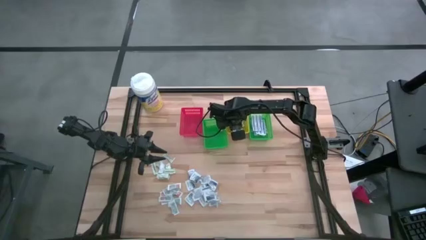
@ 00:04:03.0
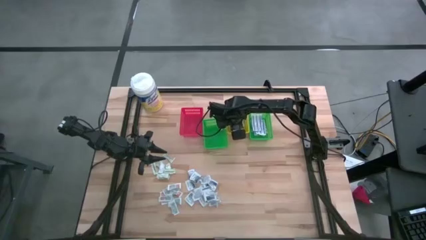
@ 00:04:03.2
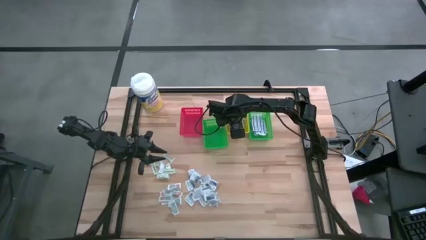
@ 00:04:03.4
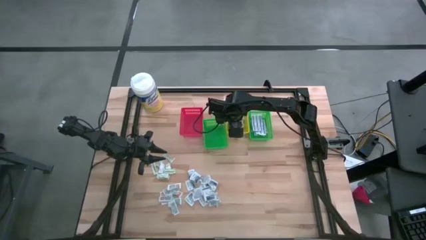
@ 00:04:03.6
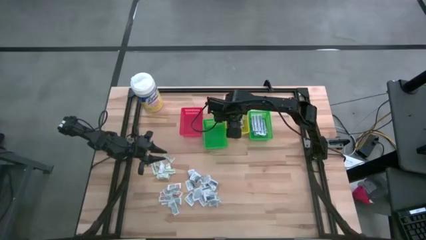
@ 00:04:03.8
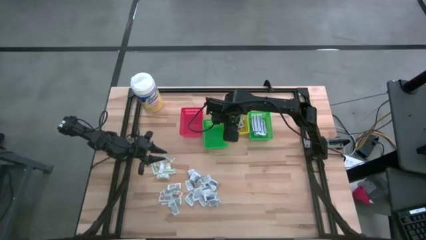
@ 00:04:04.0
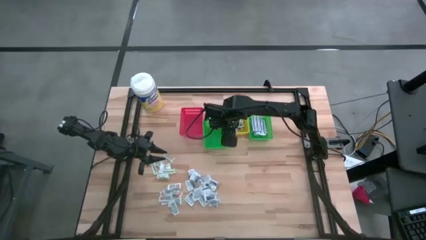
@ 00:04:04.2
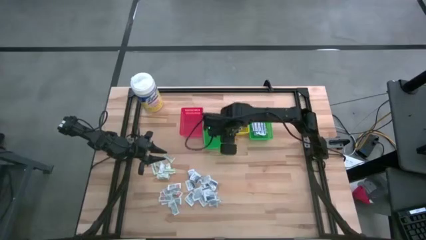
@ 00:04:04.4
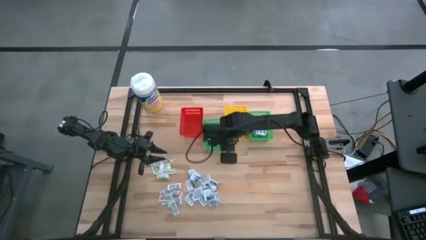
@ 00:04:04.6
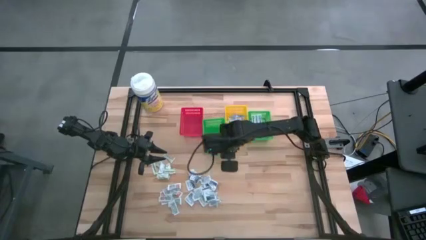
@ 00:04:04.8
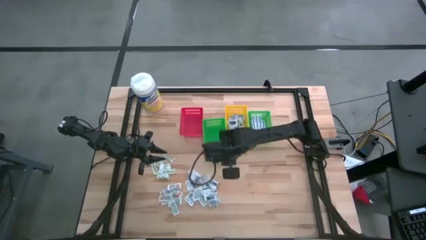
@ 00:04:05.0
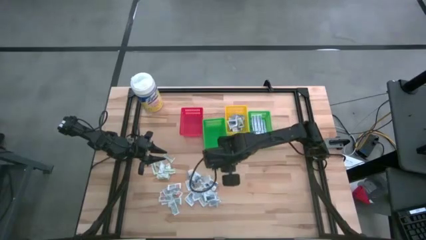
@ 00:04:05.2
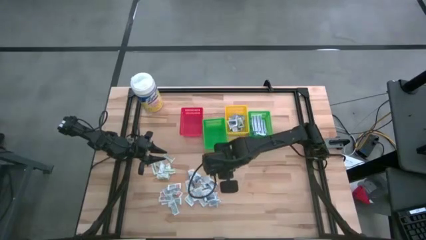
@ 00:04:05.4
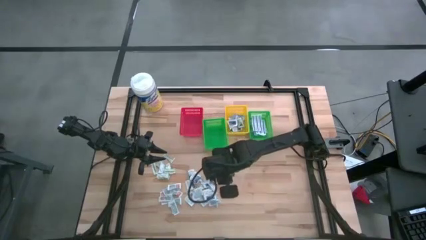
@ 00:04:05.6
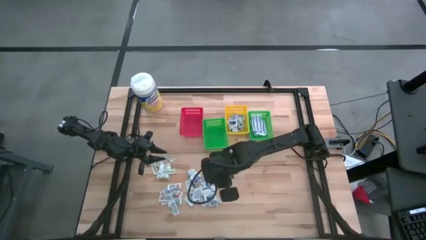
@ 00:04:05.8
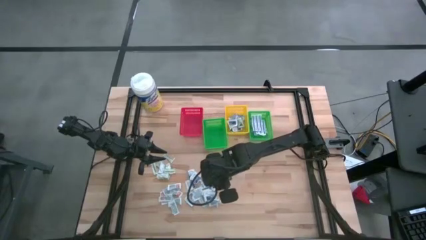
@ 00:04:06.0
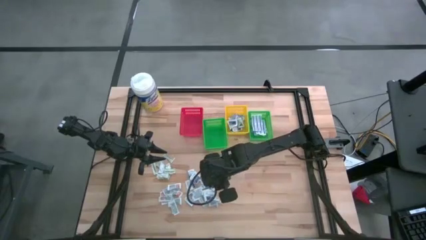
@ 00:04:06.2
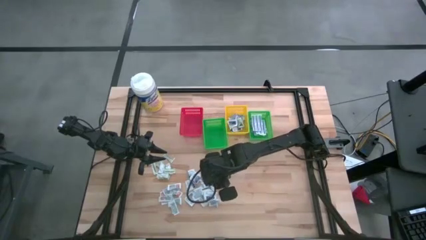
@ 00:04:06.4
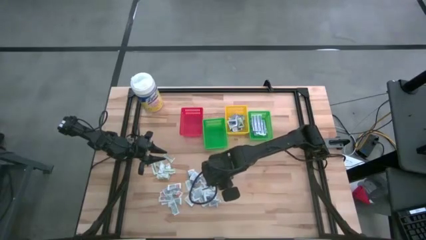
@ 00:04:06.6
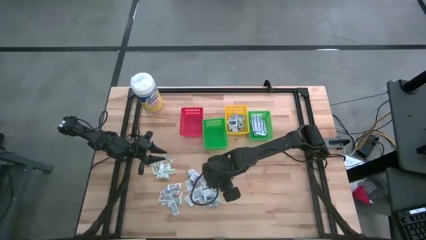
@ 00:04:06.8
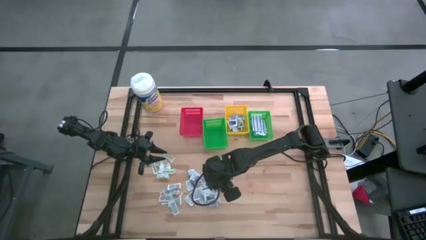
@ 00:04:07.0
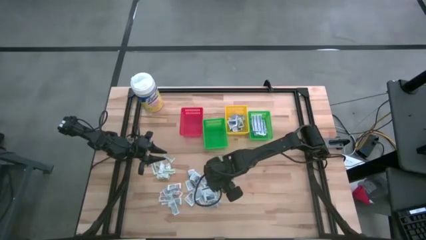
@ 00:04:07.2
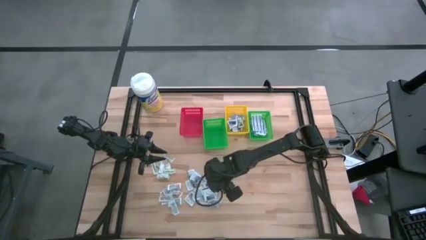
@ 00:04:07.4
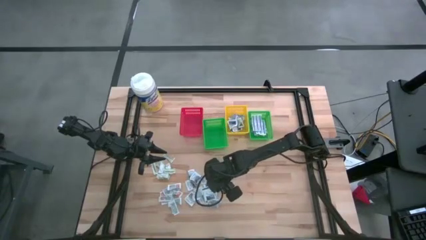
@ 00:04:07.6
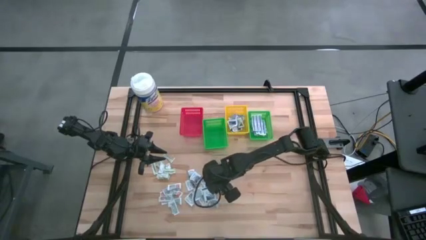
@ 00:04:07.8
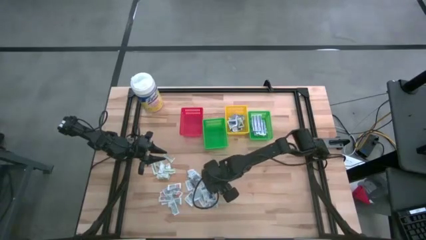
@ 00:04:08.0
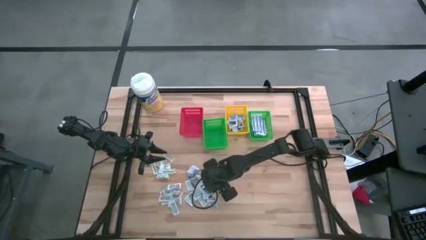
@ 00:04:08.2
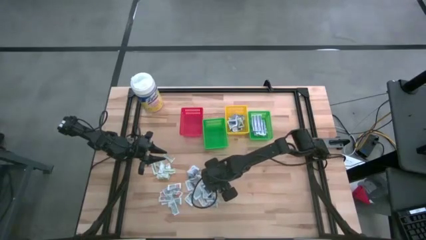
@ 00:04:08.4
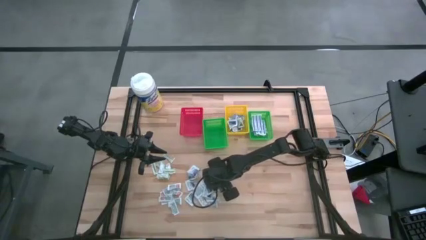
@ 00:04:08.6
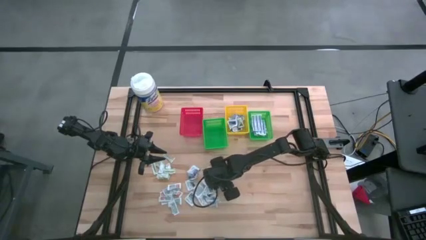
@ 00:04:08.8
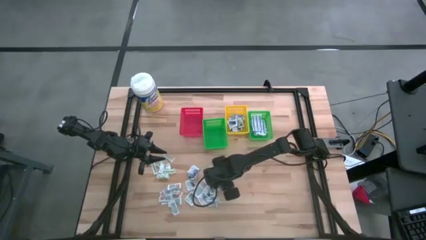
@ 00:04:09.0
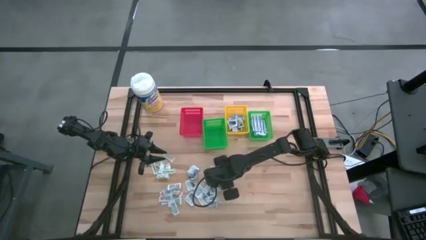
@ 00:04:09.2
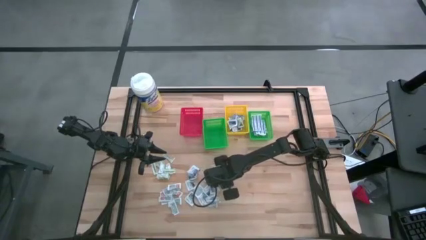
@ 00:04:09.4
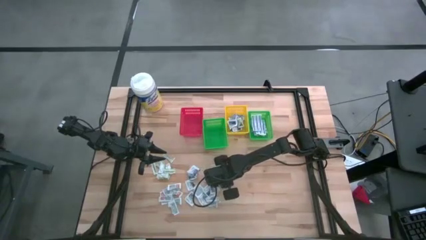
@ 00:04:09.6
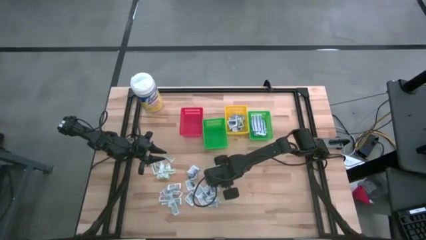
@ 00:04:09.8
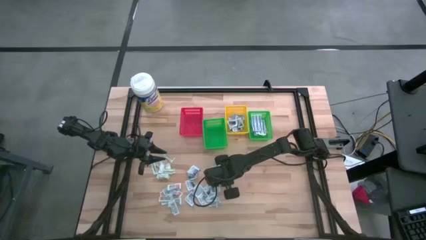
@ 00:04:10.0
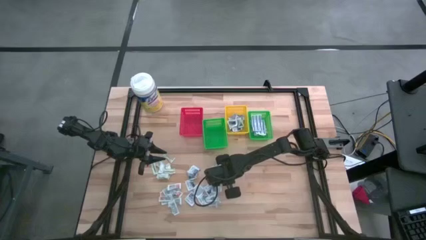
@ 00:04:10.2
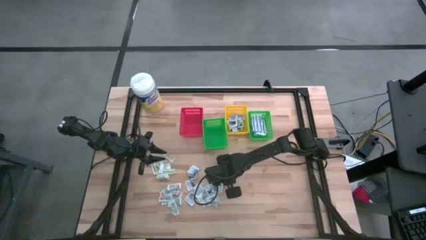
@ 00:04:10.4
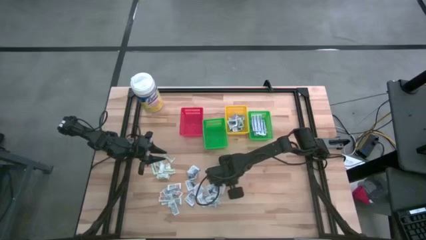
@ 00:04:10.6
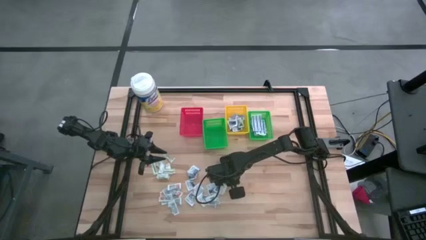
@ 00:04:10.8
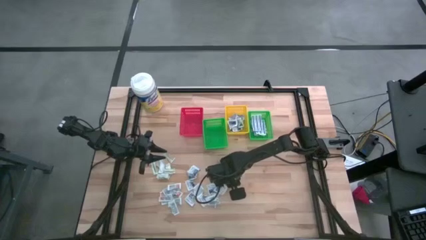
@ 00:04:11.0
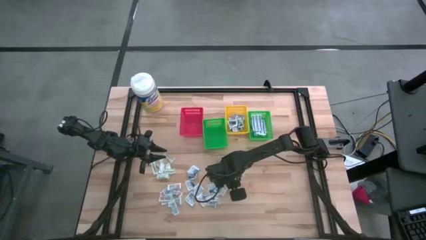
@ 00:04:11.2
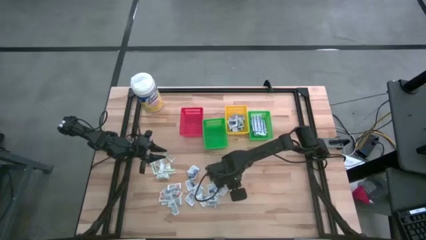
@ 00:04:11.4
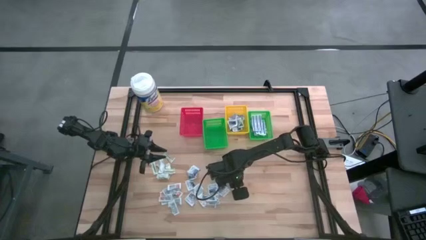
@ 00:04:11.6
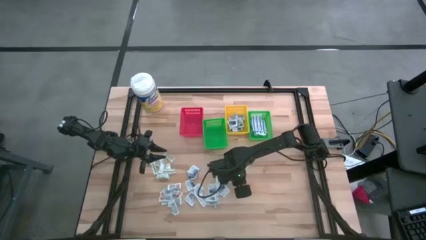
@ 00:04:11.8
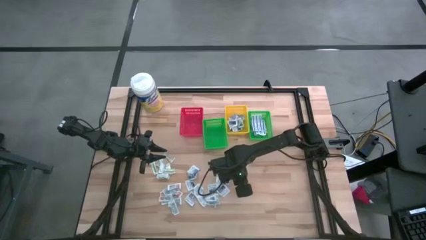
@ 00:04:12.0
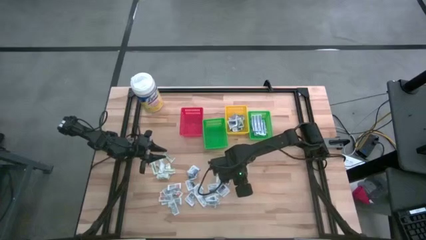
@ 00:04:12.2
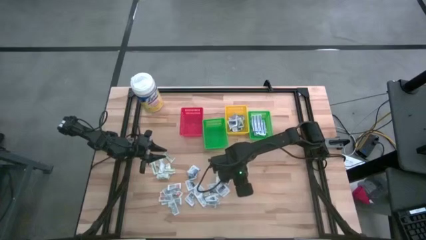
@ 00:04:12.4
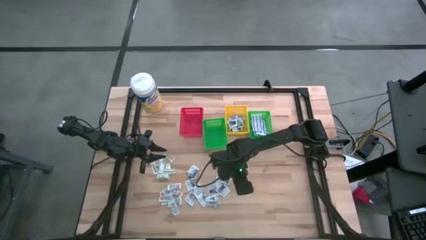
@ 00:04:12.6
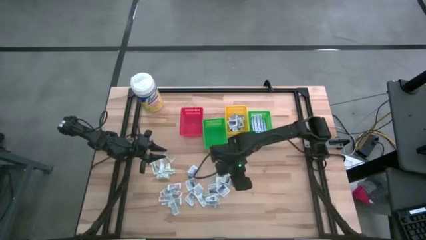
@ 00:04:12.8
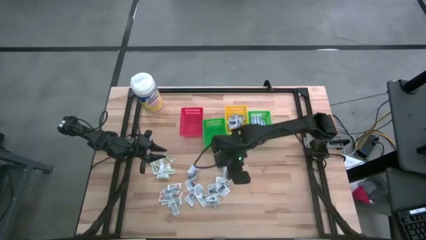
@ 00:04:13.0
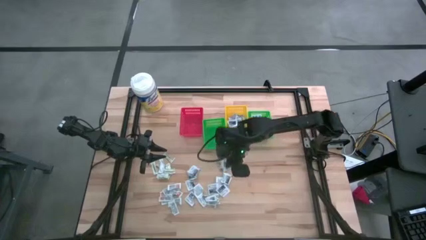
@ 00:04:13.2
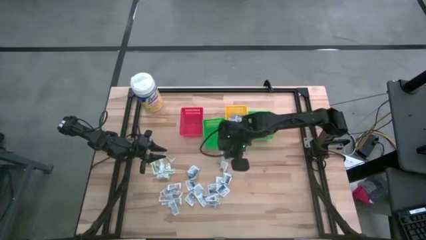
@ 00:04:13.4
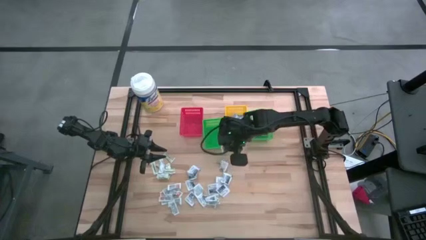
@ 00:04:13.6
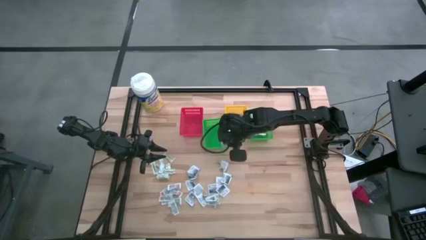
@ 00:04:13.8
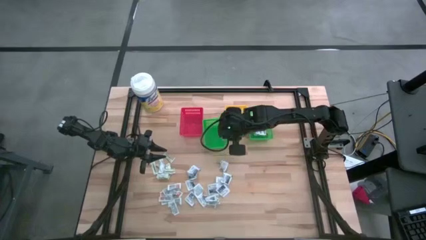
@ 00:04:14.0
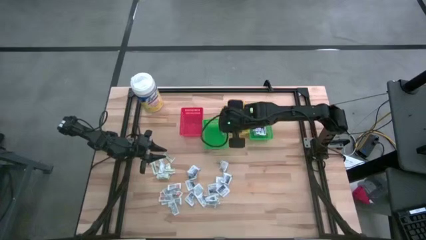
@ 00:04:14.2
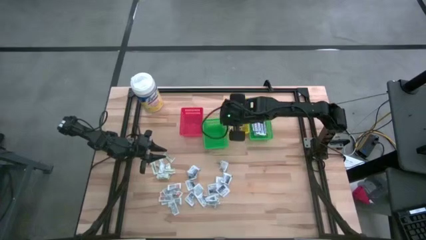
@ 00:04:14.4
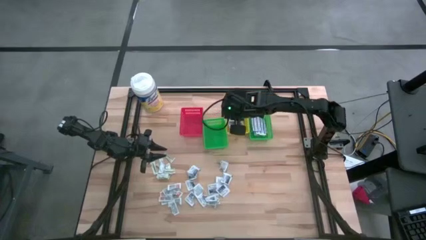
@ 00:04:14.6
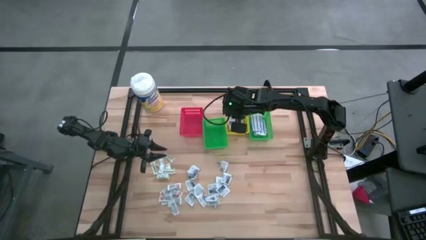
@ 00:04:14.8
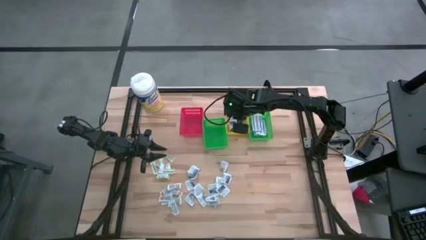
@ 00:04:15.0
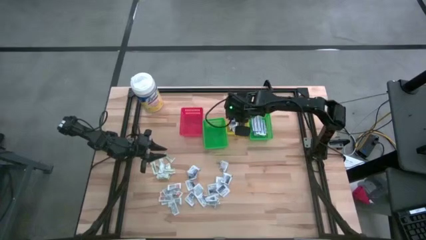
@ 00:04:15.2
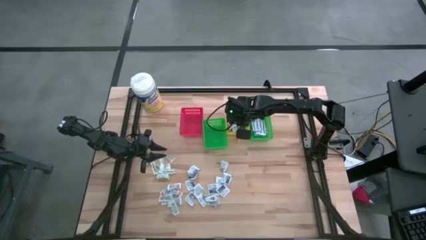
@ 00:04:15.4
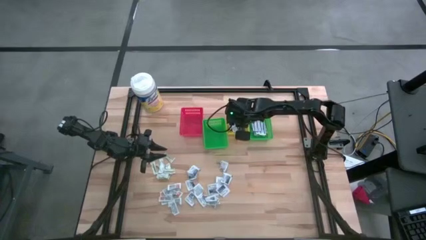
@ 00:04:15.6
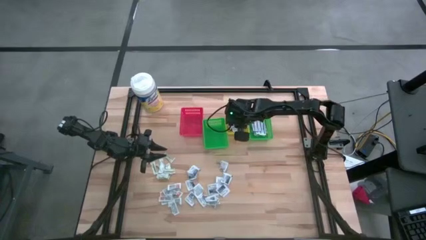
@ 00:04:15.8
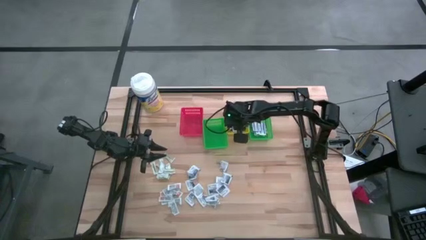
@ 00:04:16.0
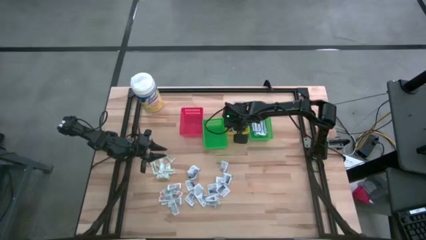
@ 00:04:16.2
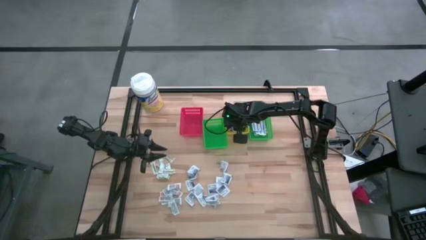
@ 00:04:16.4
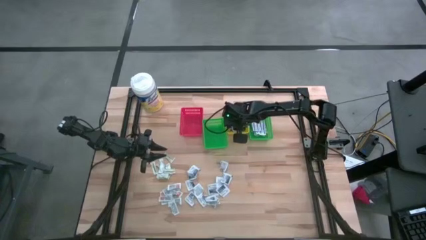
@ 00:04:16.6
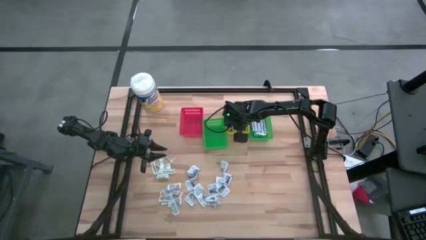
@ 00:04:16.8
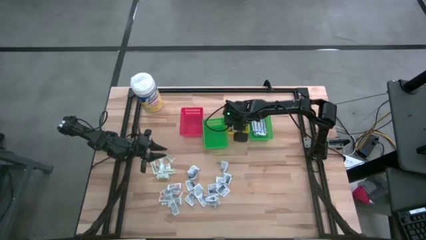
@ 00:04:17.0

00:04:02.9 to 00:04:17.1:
Task: Pick & Place First Aid Supplies
Put the alcohol pad into the yellow basket

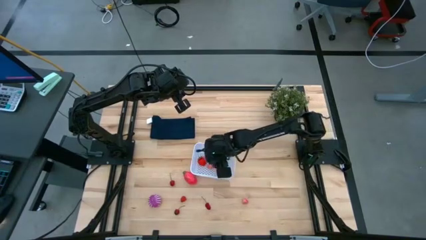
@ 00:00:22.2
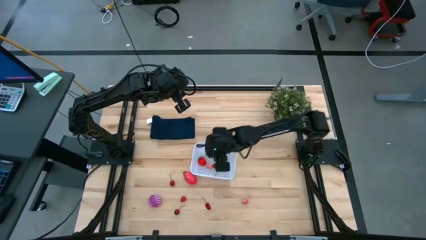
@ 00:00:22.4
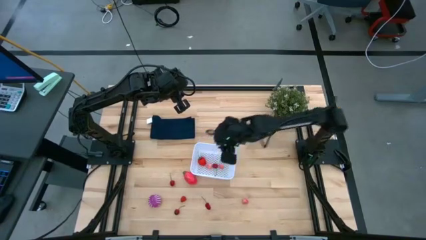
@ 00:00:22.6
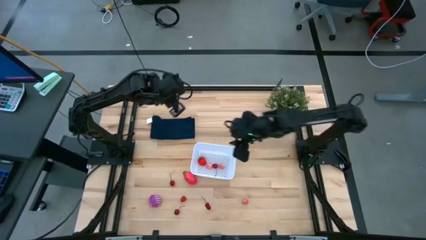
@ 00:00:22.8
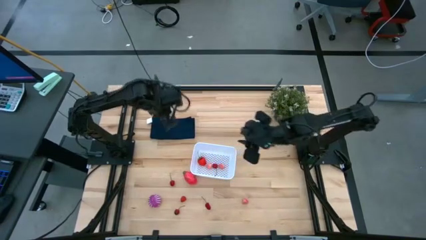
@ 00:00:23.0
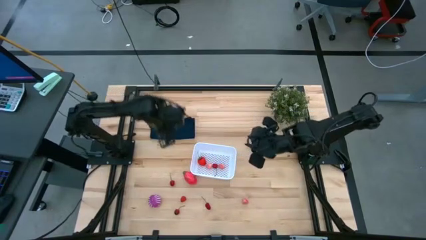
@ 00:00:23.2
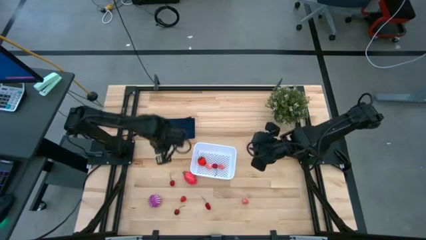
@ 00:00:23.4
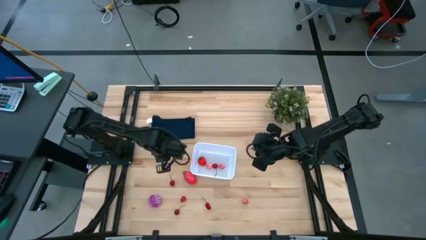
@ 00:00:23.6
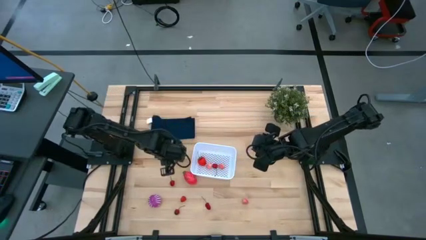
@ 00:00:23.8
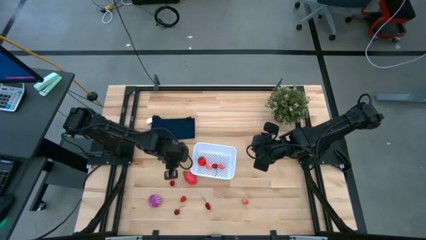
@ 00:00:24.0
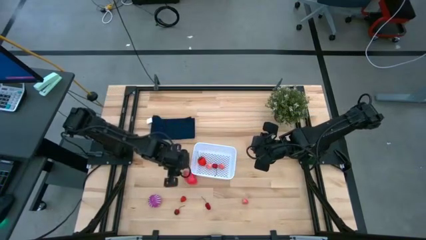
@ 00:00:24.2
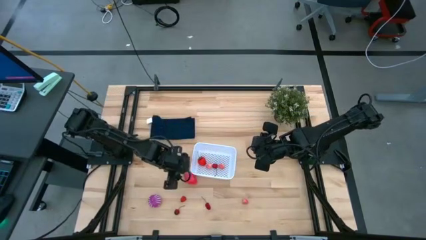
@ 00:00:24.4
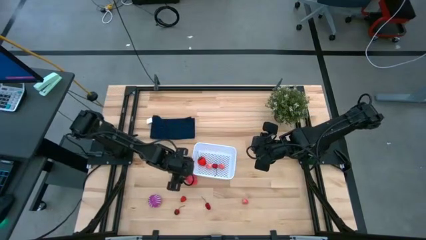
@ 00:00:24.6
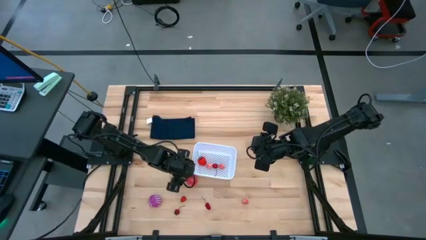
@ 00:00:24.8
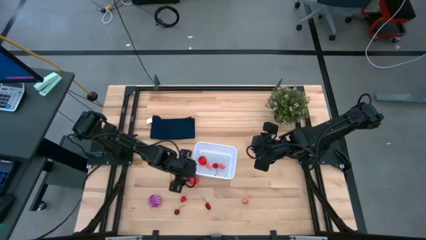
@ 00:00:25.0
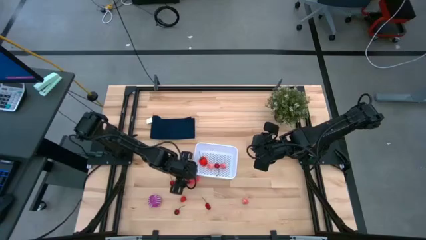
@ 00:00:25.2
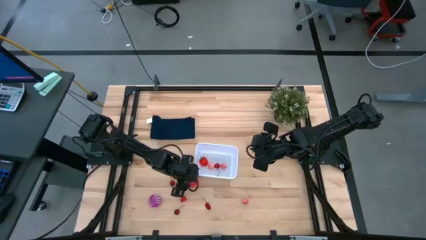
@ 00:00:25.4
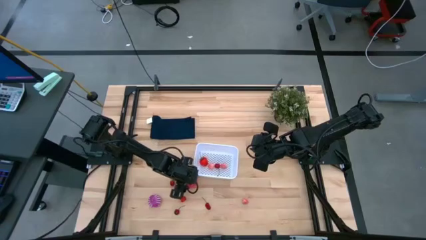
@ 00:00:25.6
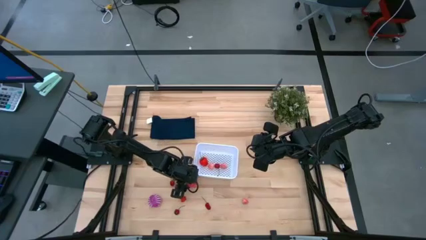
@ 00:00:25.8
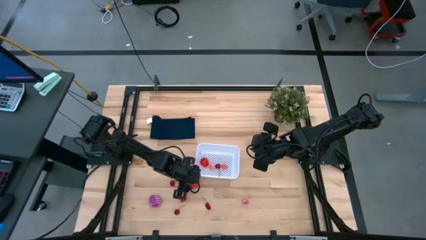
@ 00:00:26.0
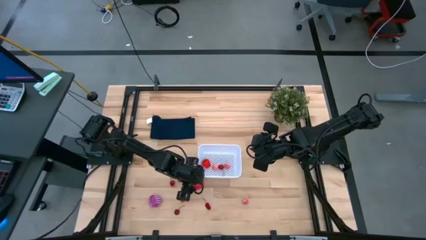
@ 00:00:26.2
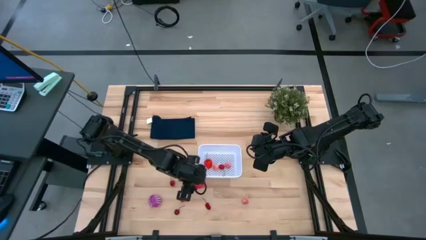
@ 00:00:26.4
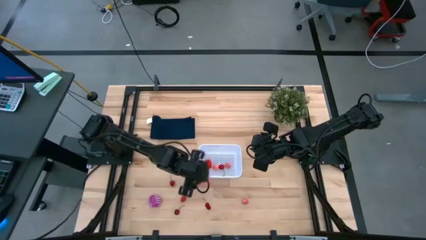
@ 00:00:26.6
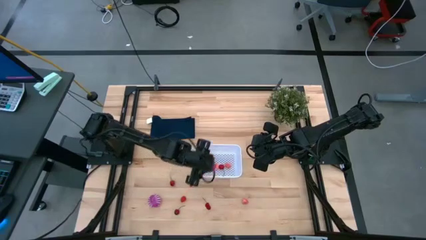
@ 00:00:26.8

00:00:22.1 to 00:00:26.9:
Task: Pick and placing Produce into tupperware
Put the dragon fruit into the white bin
